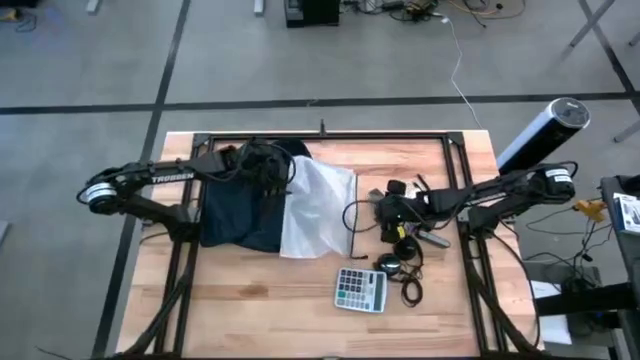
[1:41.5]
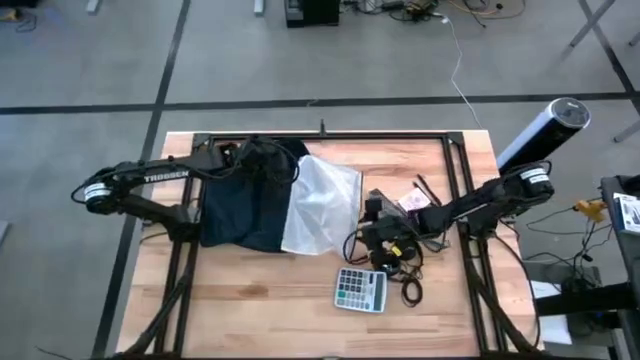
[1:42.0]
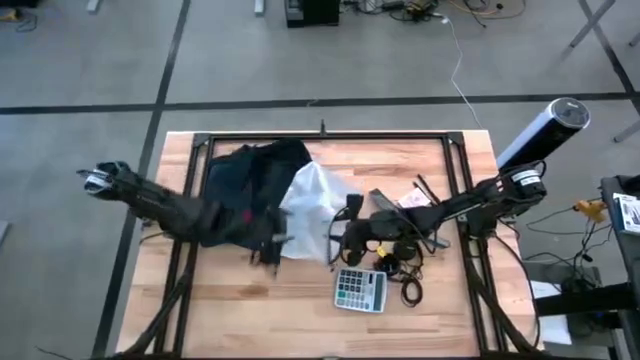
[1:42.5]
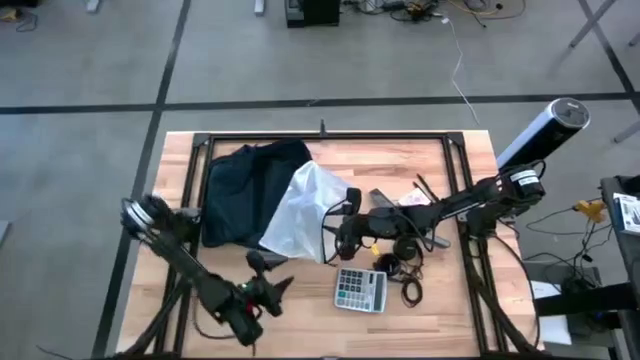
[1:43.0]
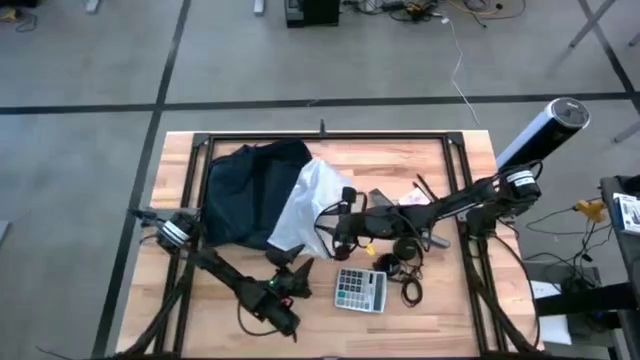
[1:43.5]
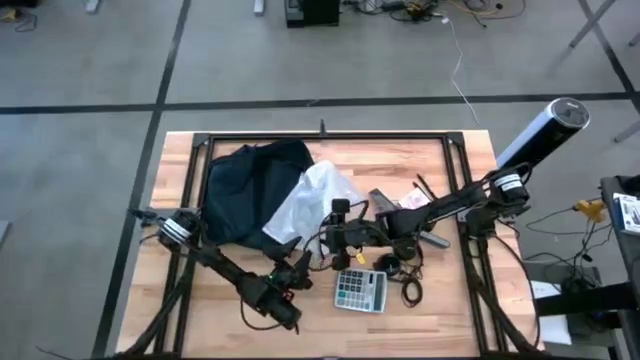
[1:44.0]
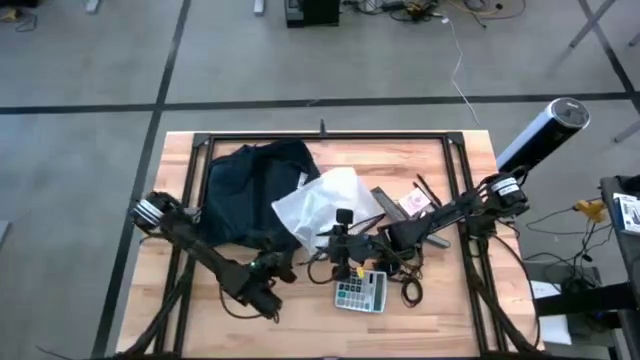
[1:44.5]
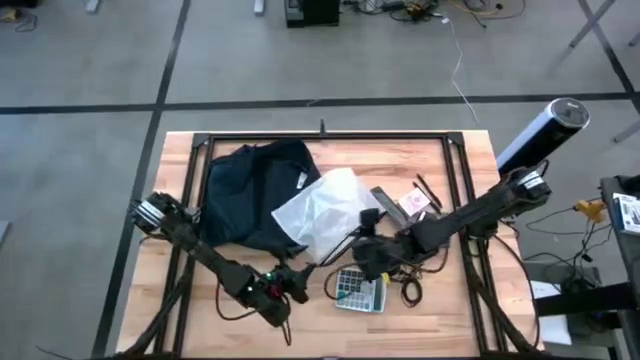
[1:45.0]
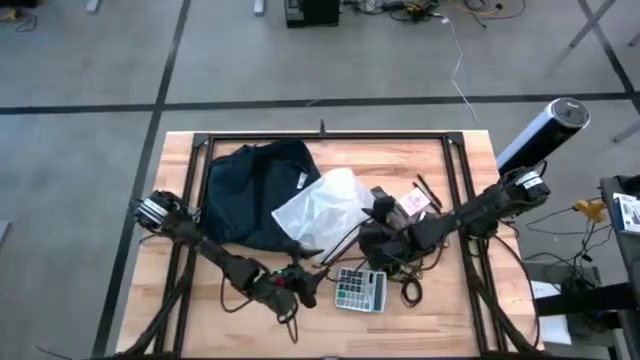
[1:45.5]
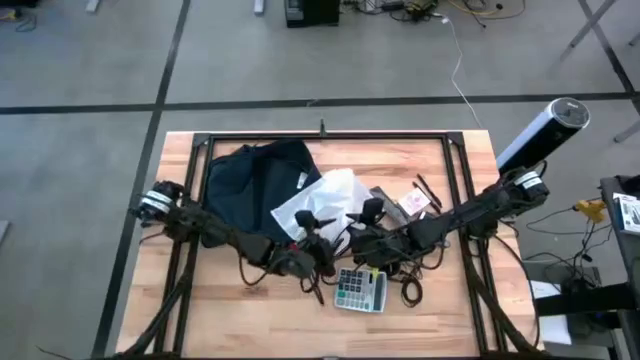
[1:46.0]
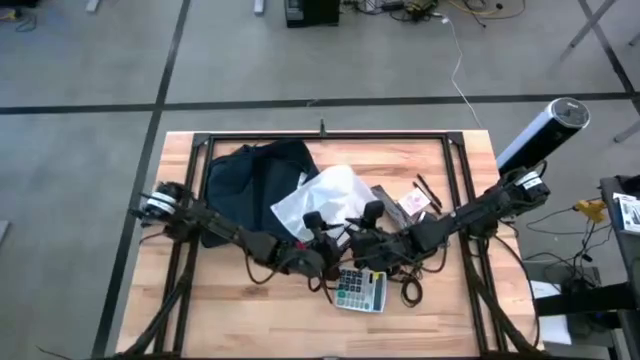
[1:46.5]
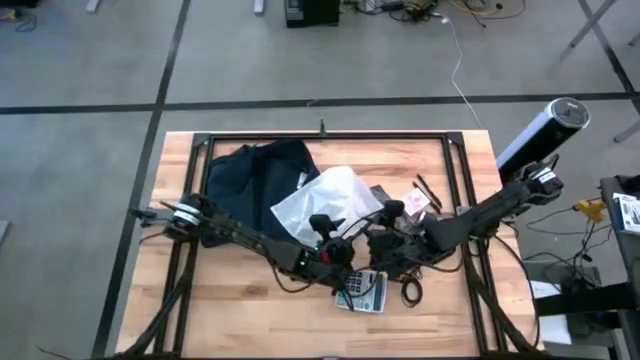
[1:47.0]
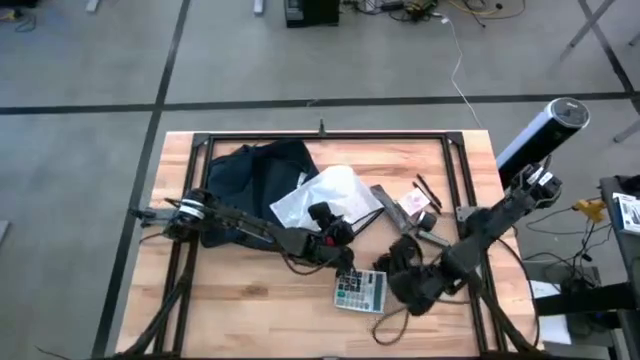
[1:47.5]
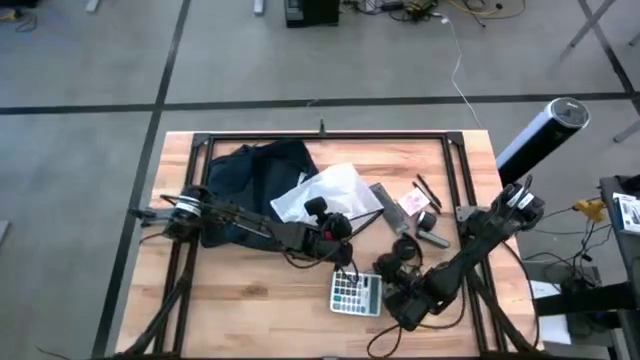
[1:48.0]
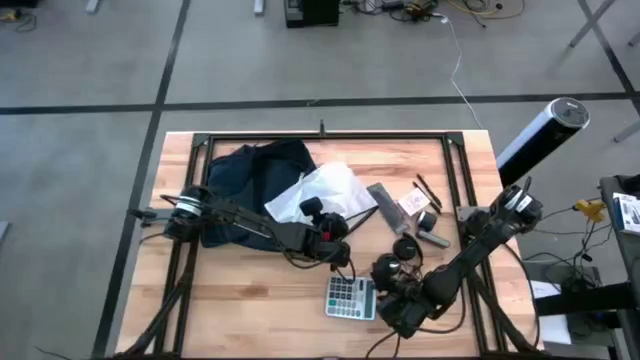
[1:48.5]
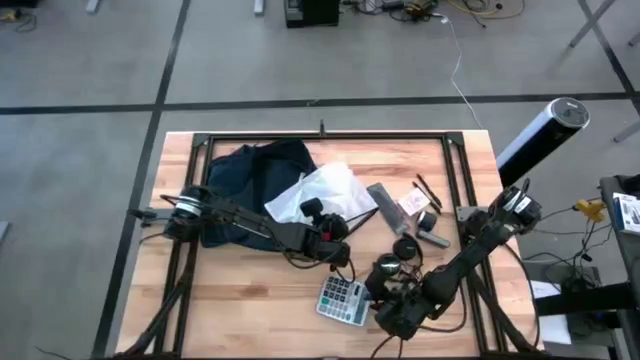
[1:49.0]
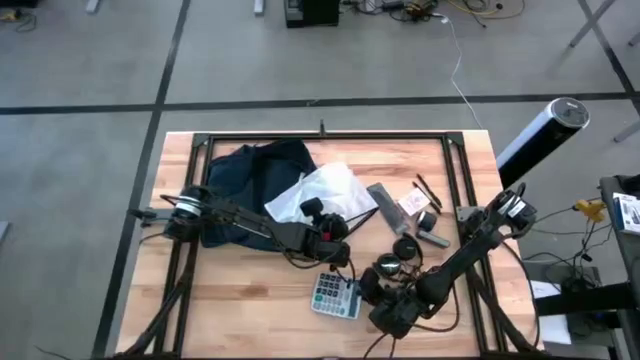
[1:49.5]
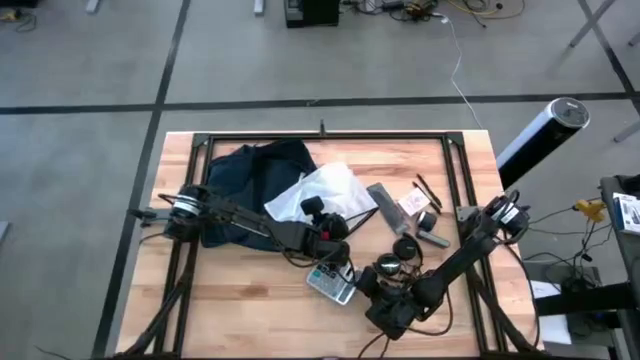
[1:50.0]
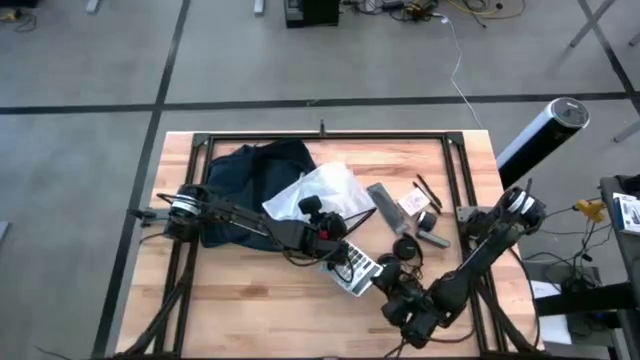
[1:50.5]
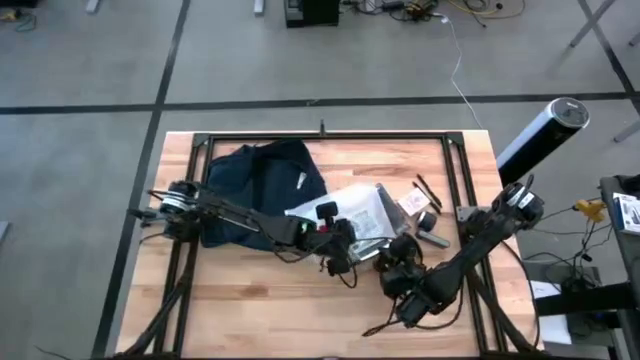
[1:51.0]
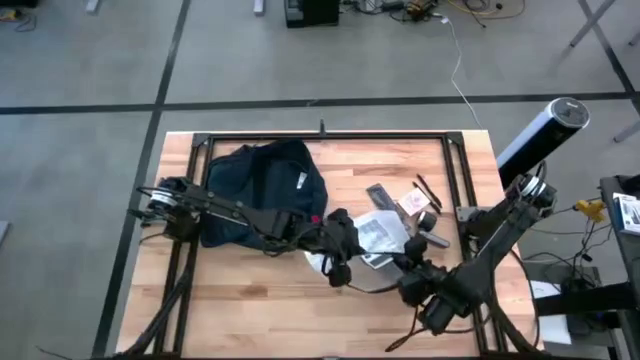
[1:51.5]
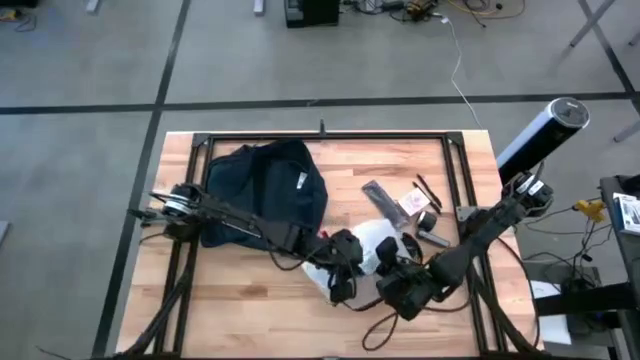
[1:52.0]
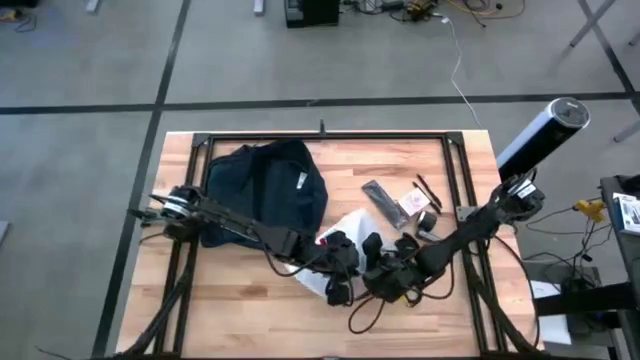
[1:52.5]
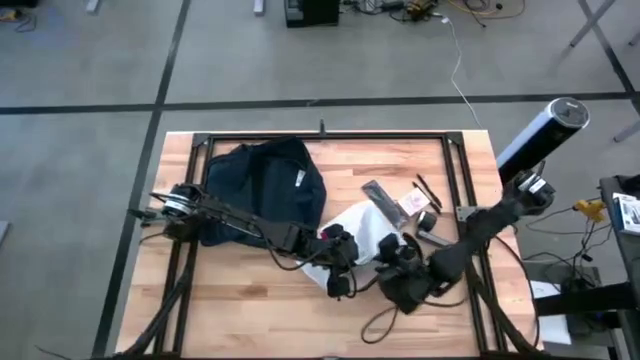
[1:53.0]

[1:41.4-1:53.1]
Task: Unpack backpack
Put the white calculator into the white zipper pouch

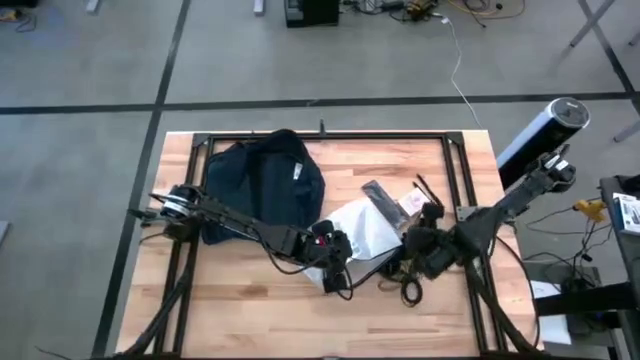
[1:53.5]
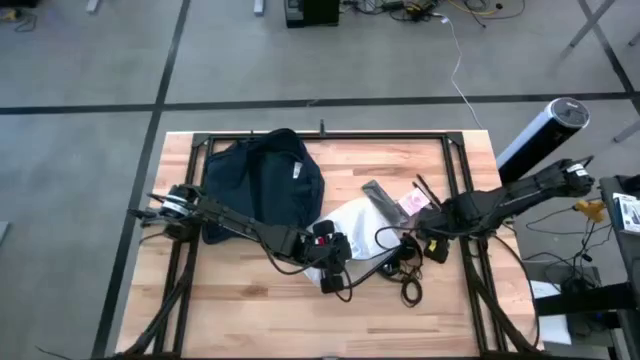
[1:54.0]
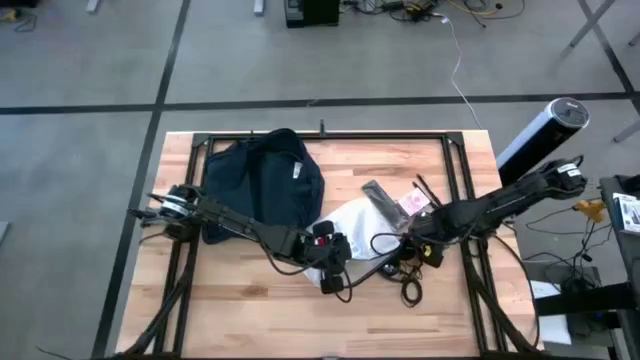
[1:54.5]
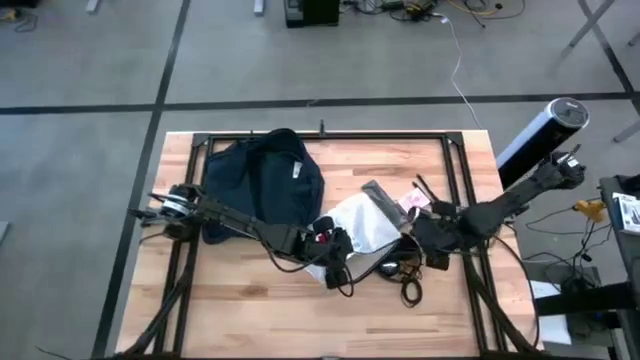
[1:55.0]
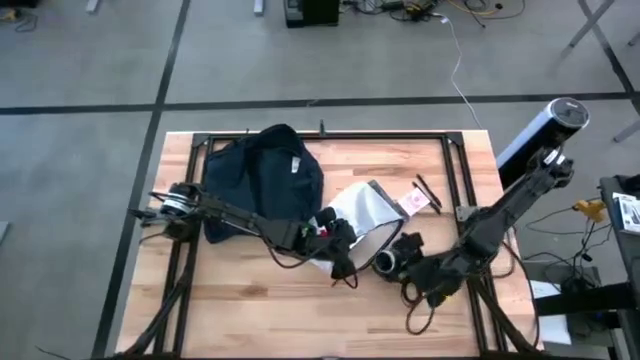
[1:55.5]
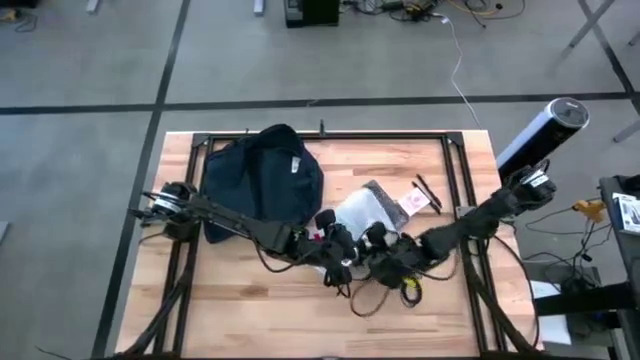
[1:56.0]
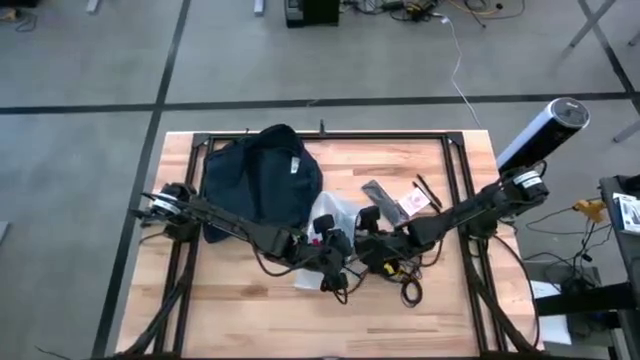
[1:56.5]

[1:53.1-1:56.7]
Put the black hand fan into the white zipper pouch

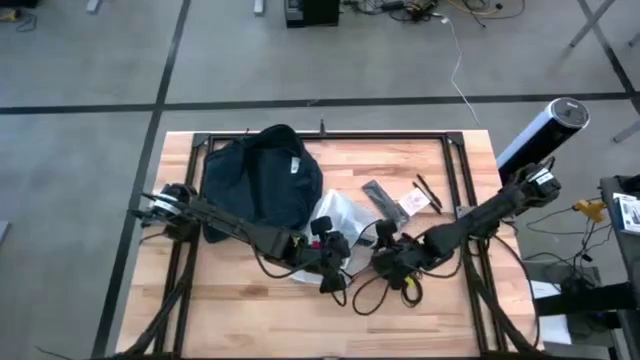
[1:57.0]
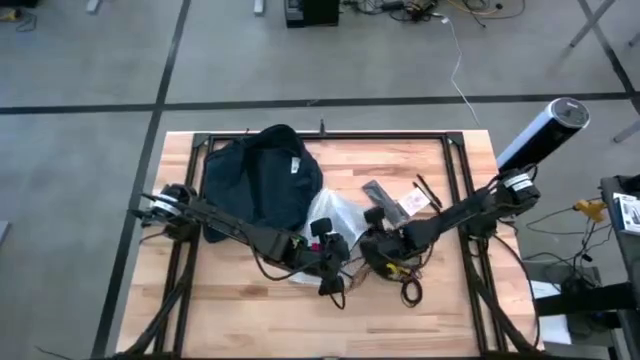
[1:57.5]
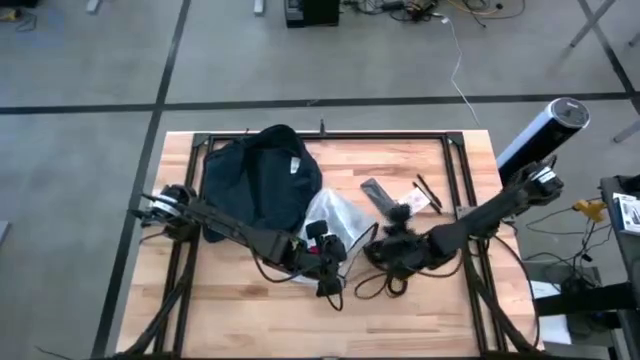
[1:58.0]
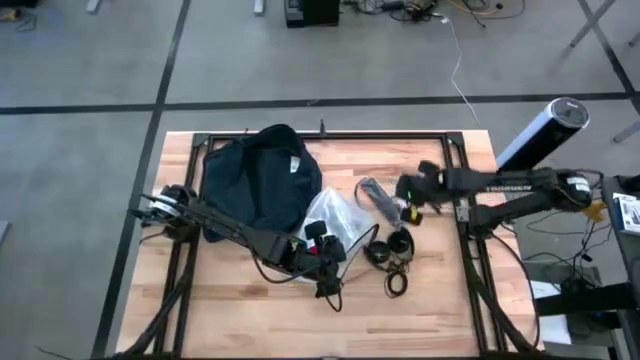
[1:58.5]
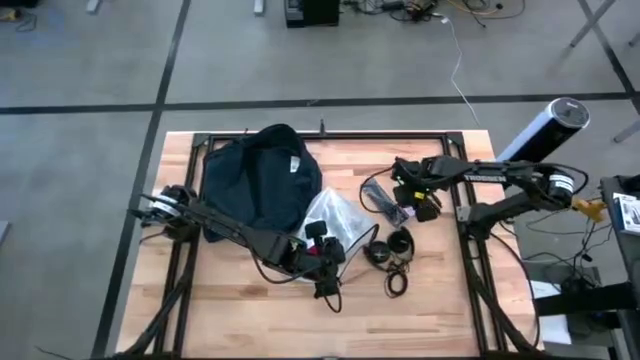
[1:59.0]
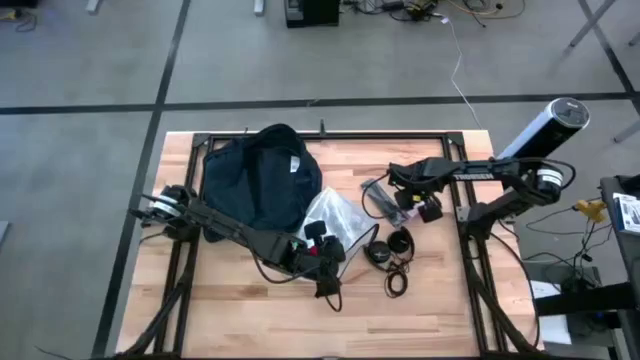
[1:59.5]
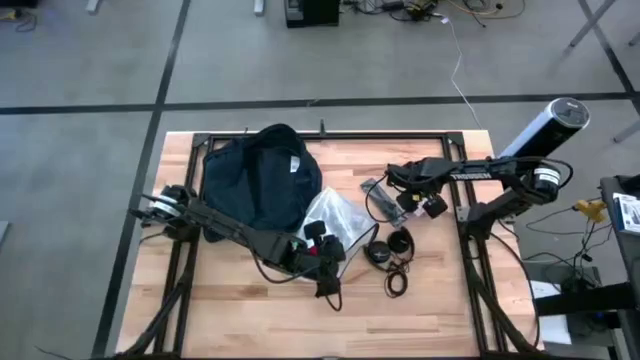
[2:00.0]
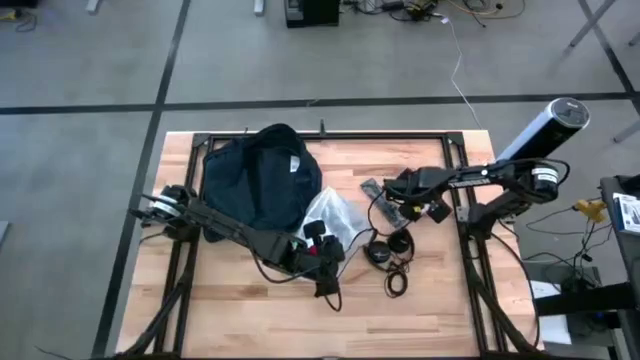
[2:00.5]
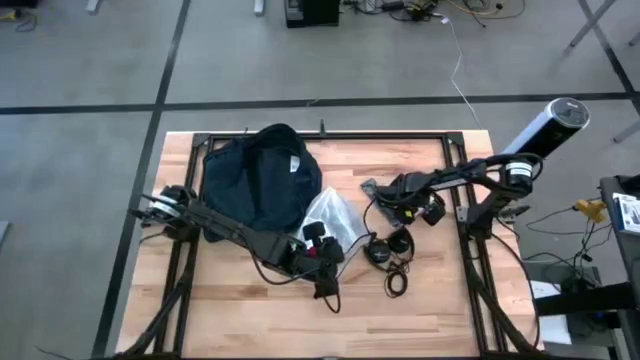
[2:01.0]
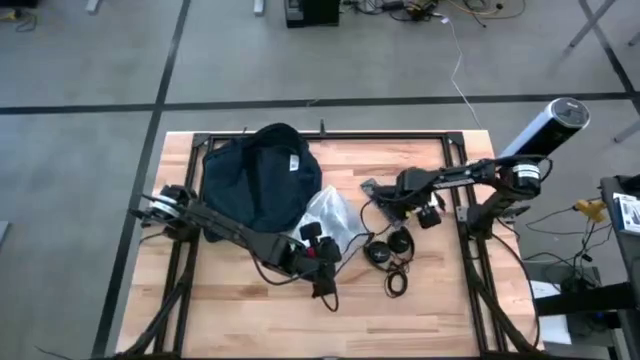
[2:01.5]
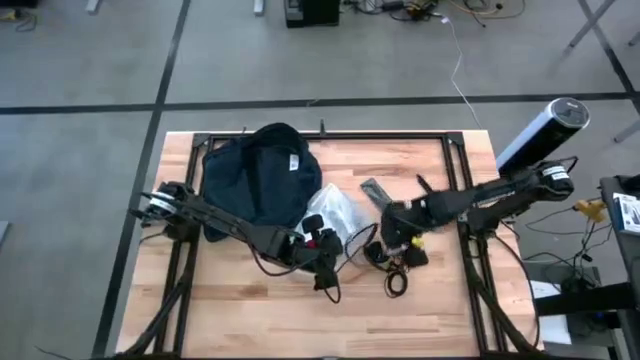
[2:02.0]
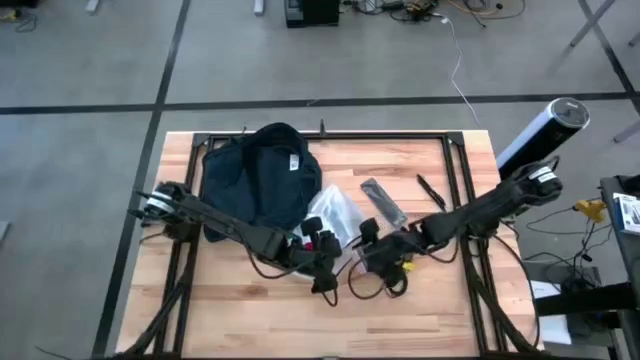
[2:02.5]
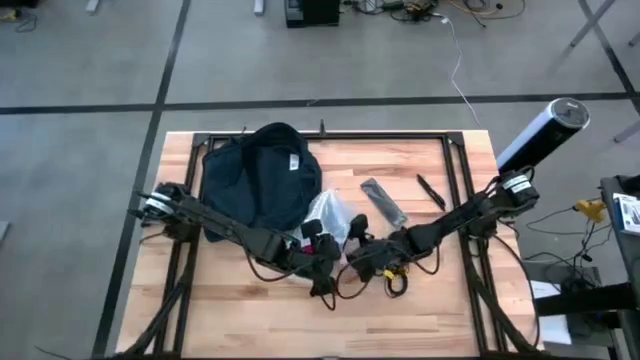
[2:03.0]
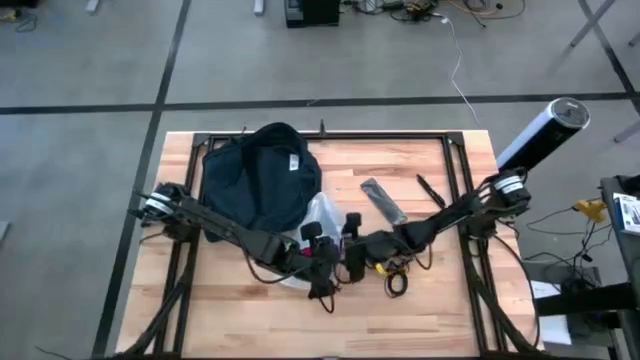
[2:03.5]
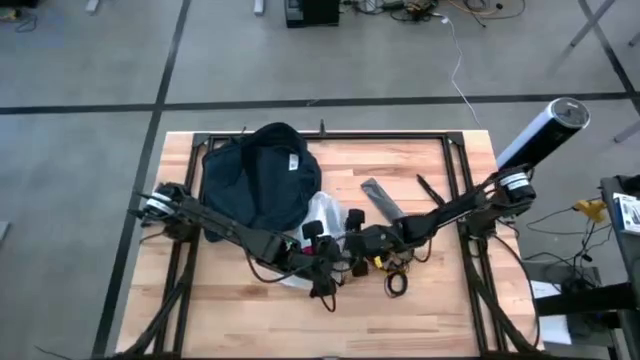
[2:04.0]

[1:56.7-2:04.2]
Put the red tuck box into the white zipper pouch
